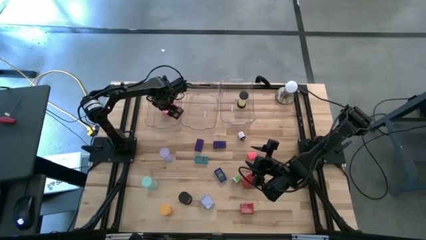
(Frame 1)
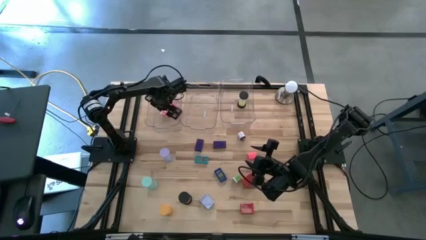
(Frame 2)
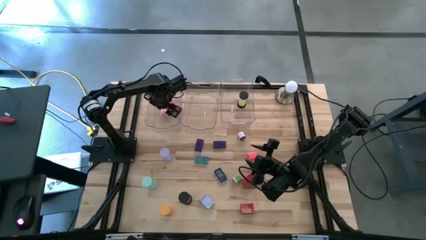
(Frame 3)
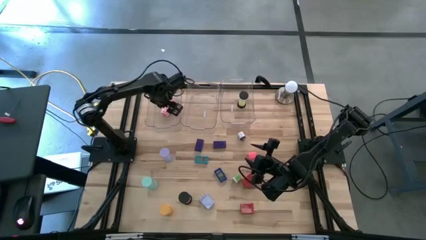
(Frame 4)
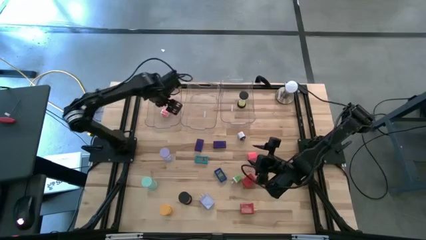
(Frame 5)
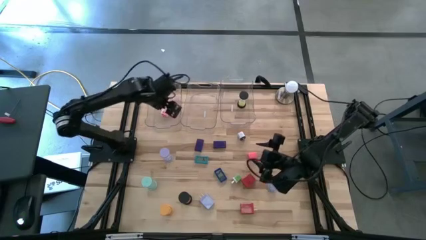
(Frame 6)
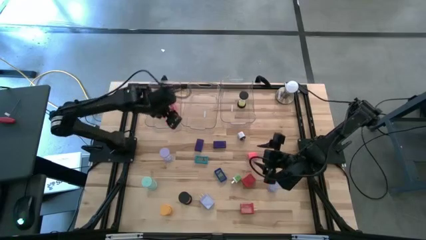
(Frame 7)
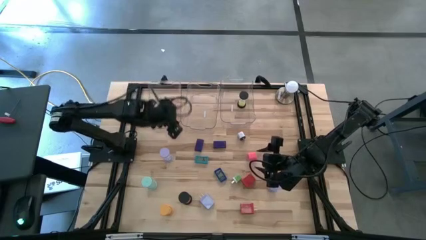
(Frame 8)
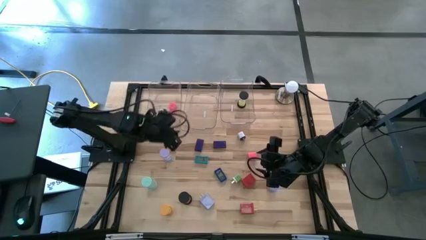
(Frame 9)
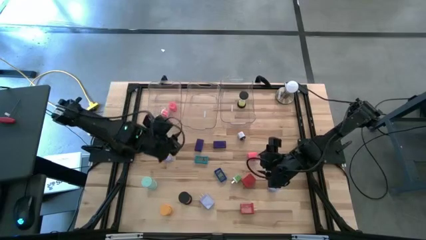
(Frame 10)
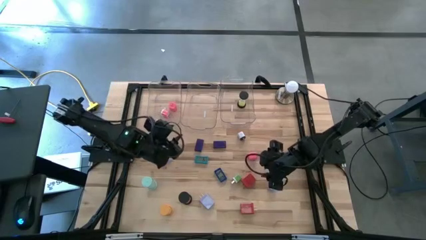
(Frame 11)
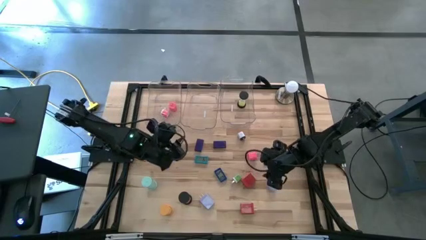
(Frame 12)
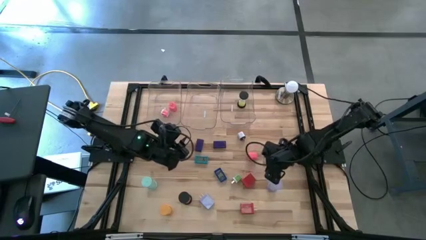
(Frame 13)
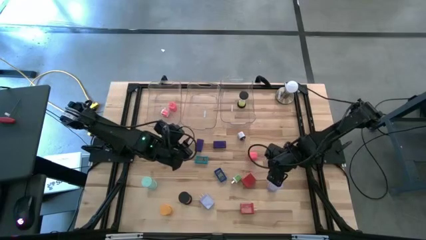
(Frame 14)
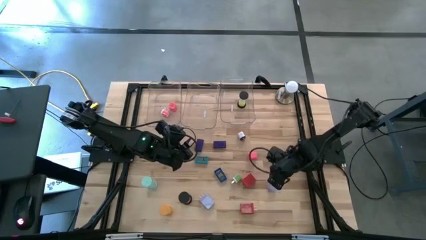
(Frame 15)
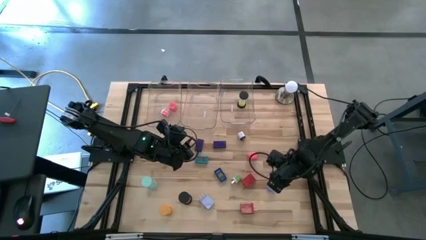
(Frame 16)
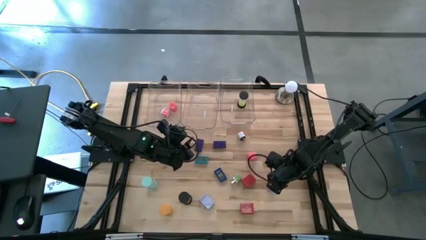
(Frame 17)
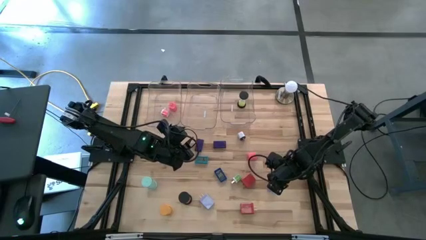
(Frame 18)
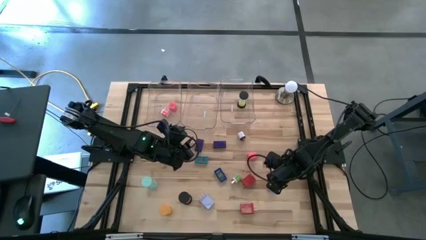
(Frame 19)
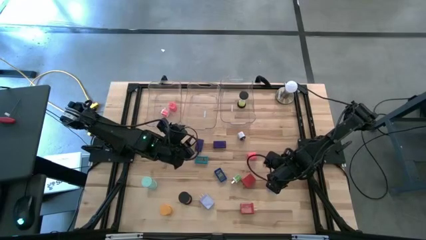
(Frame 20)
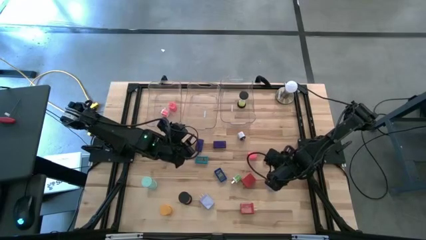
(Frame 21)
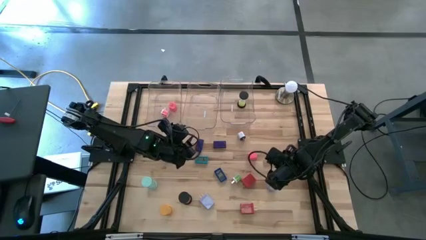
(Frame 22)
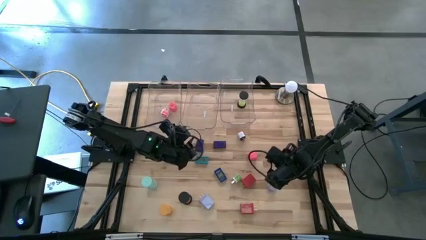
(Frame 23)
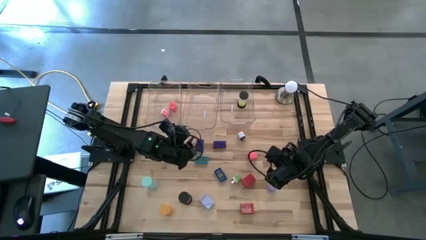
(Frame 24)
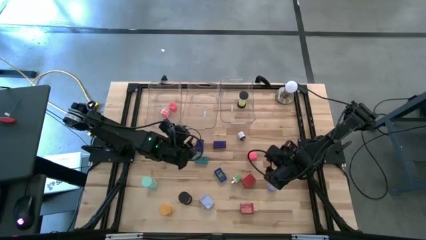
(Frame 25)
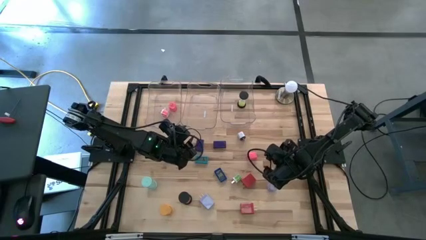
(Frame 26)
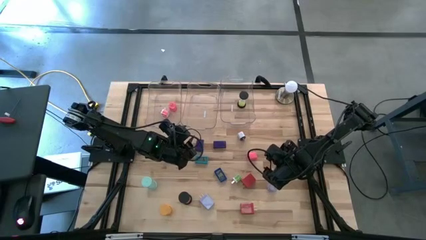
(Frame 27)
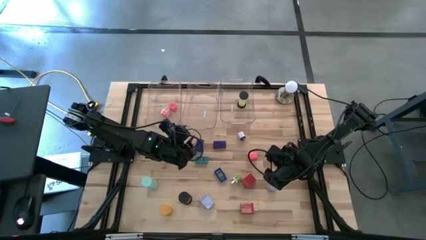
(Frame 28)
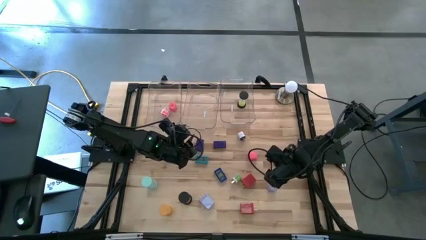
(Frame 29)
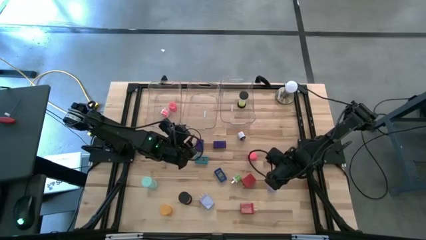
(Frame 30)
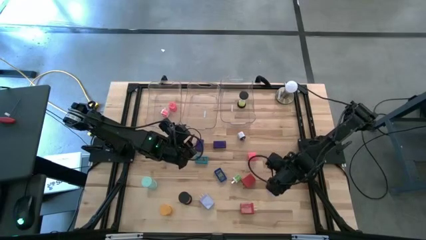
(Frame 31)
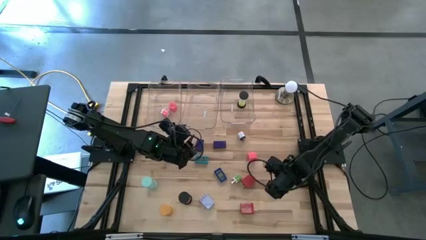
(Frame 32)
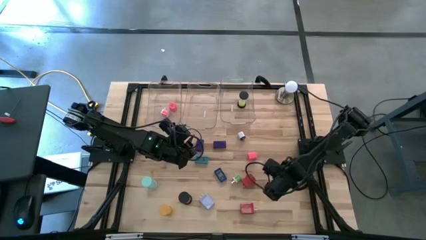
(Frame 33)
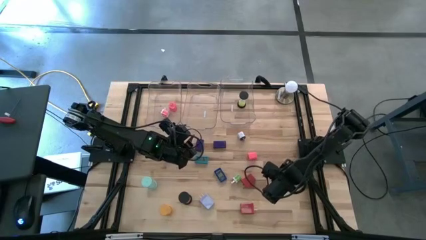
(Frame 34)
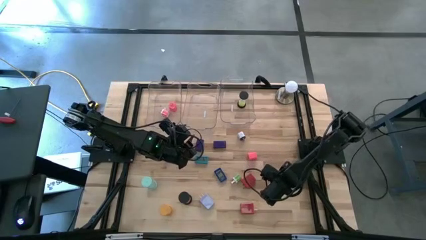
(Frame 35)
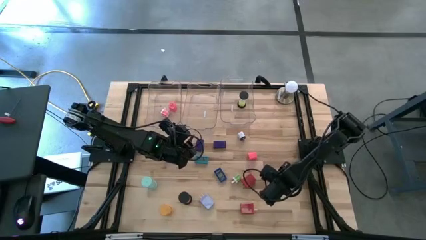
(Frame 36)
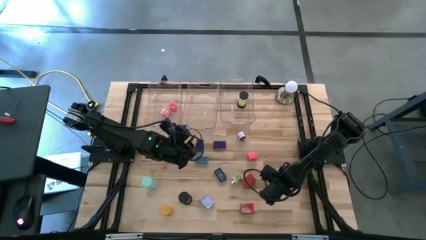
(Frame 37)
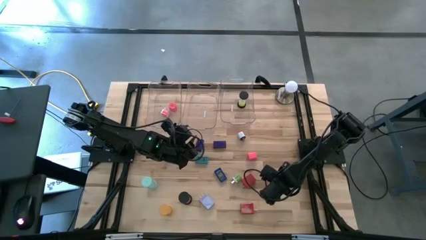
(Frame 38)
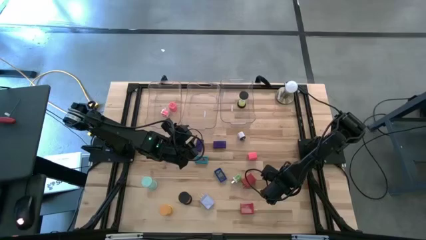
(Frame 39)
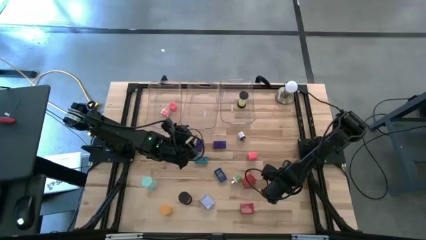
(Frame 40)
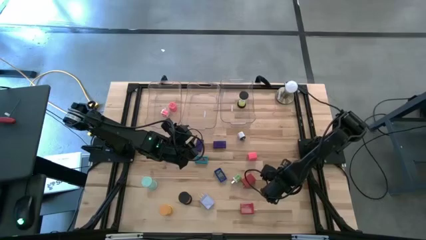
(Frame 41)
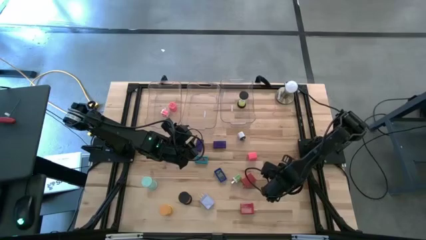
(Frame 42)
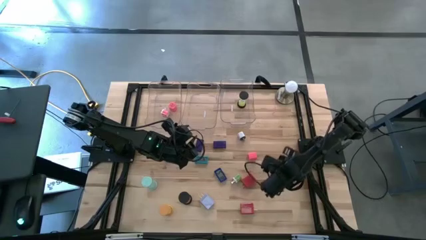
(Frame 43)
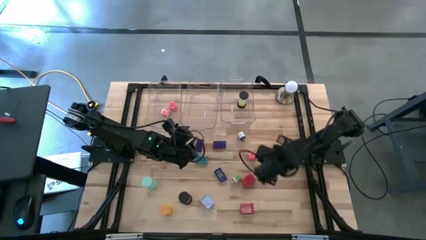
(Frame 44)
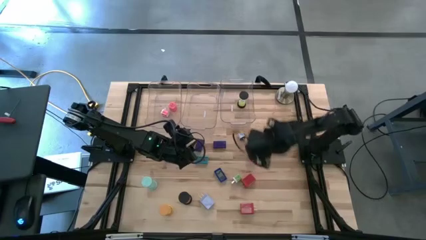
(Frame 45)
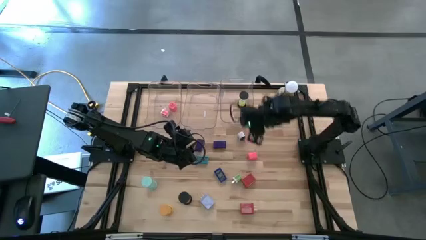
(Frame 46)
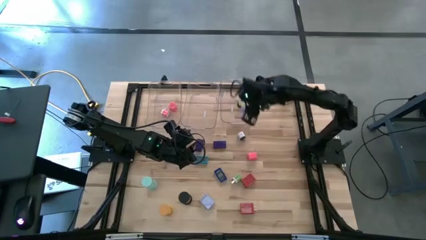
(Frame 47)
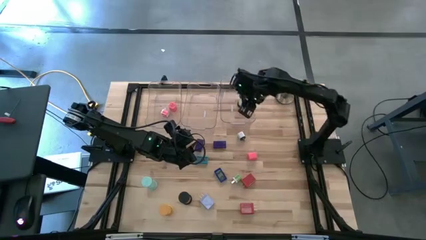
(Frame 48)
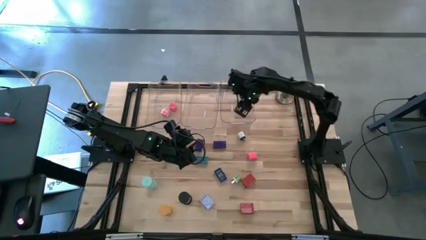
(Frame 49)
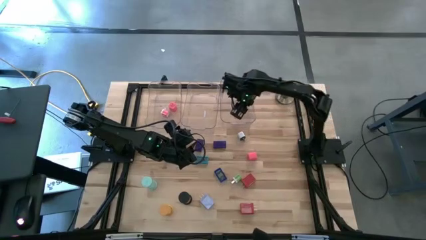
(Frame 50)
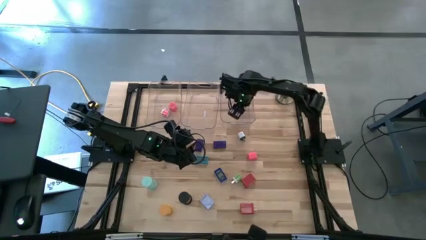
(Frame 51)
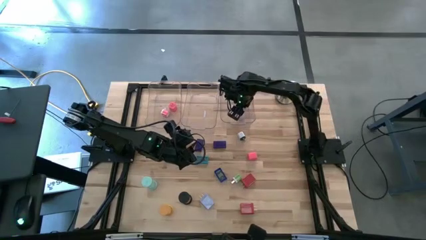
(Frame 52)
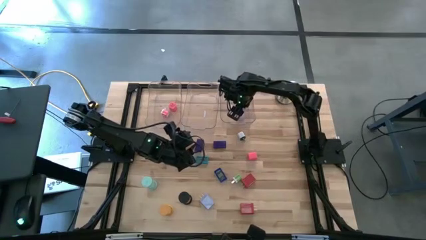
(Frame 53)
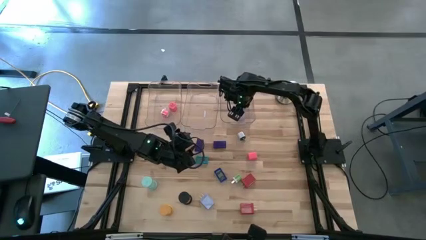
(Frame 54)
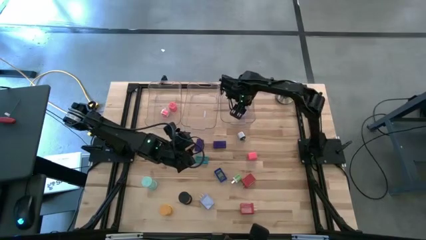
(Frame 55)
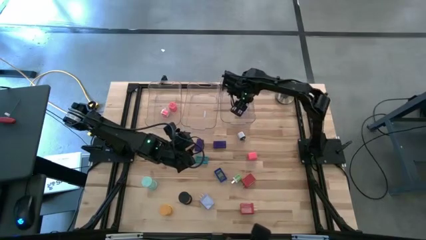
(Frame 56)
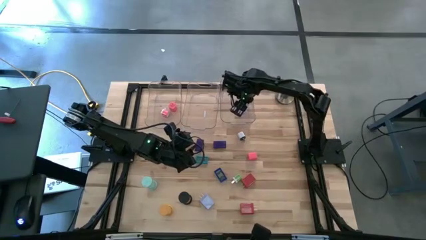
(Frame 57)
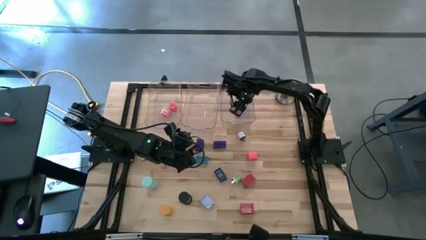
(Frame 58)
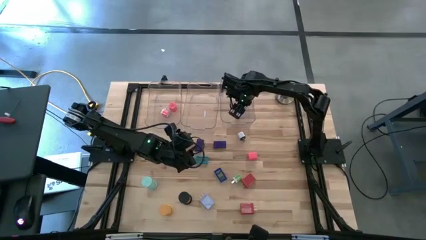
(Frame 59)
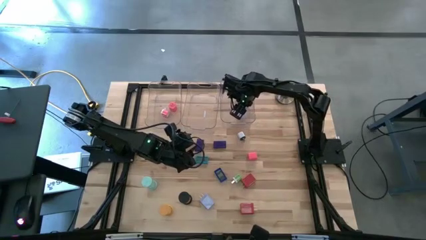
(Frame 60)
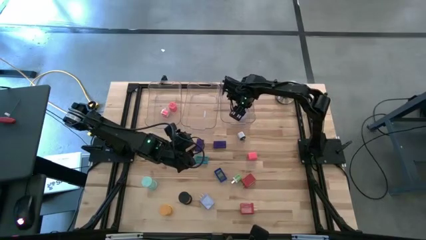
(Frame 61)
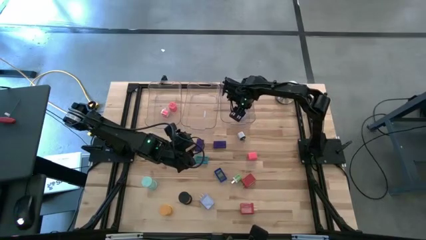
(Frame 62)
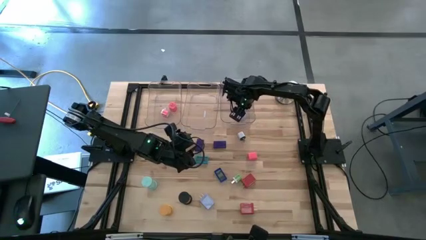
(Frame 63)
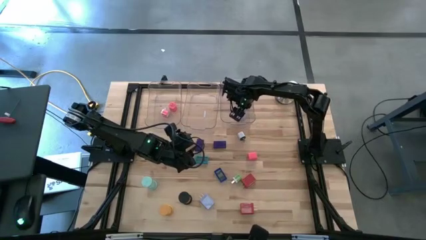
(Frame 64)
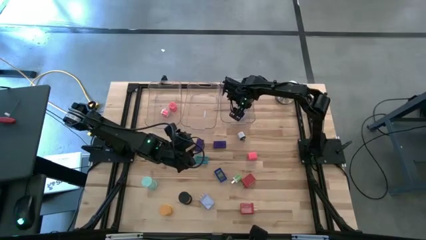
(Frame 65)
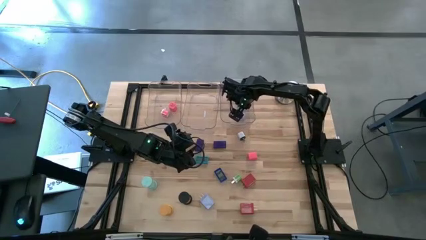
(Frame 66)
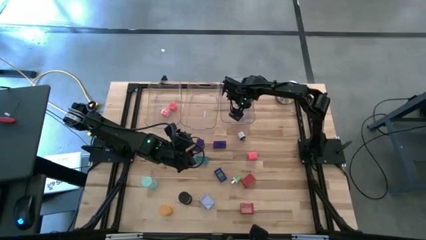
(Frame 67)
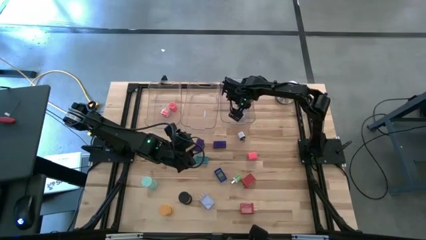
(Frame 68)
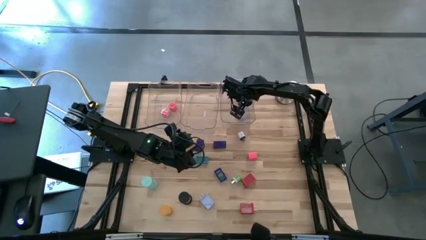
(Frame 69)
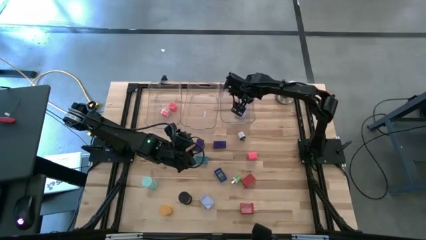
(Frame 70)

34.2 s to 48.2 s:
Task: Pick & Place Office items
Put the right purple hourglass into the right transparent bin

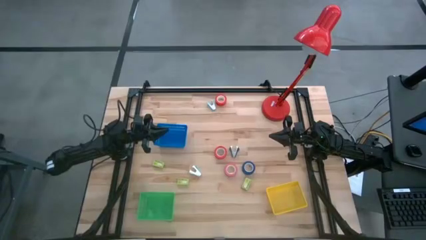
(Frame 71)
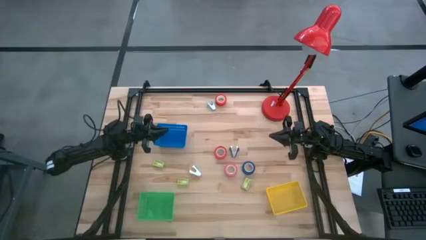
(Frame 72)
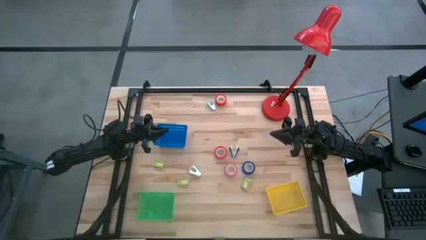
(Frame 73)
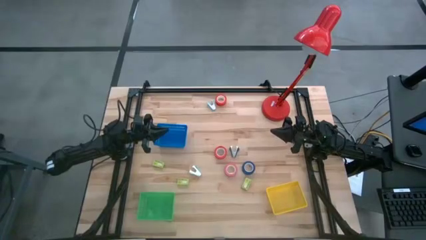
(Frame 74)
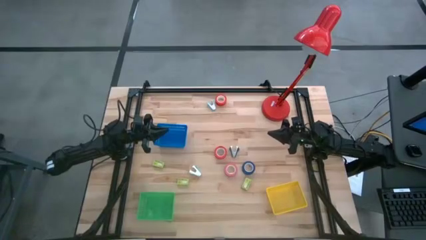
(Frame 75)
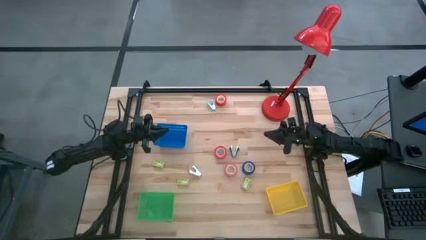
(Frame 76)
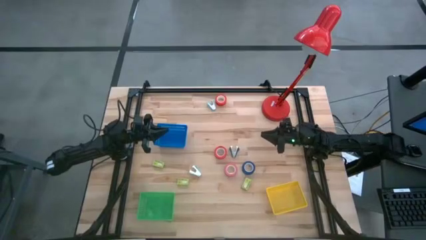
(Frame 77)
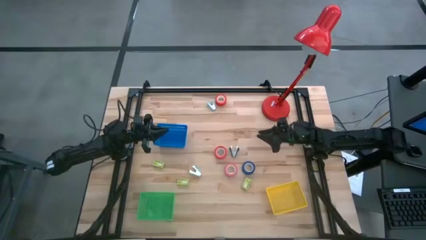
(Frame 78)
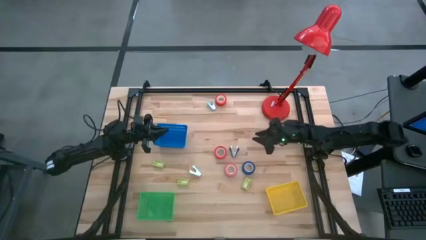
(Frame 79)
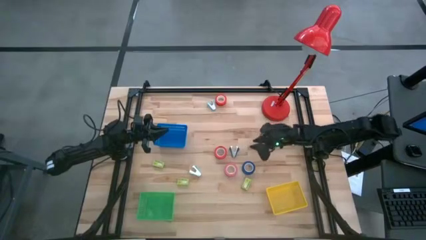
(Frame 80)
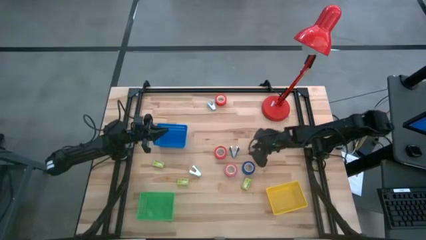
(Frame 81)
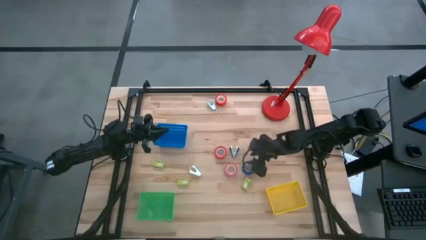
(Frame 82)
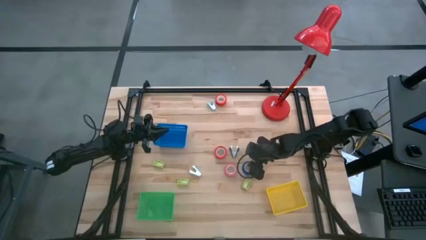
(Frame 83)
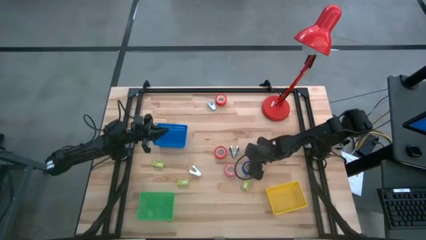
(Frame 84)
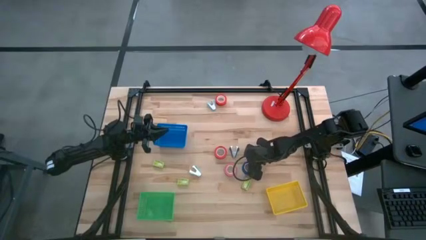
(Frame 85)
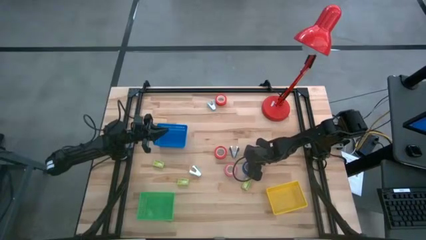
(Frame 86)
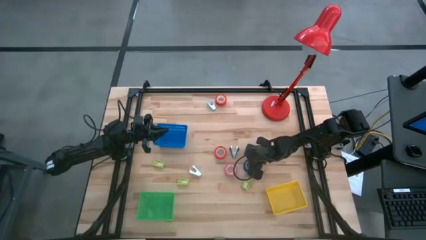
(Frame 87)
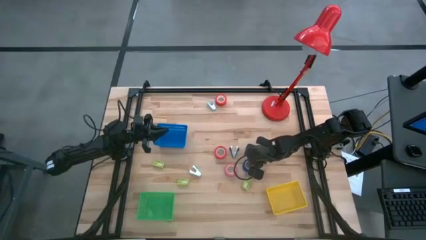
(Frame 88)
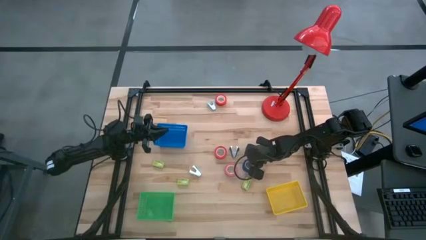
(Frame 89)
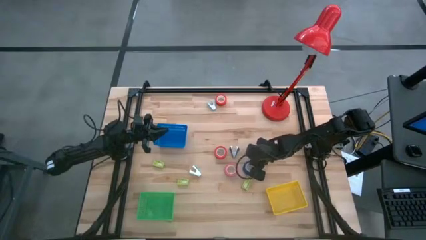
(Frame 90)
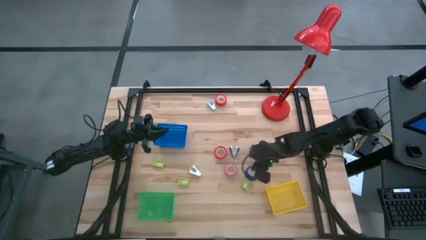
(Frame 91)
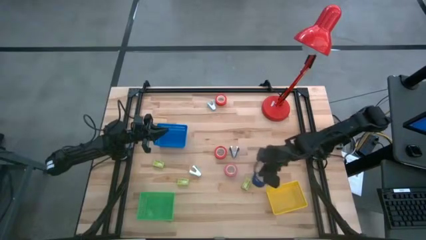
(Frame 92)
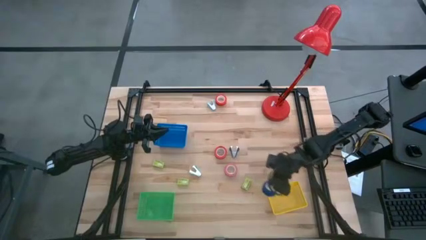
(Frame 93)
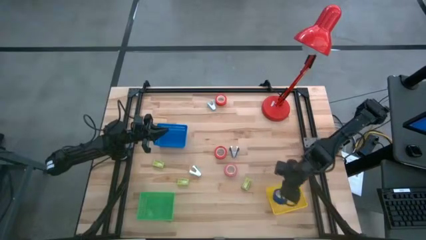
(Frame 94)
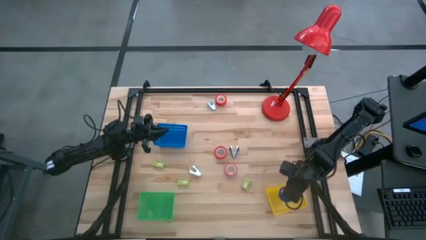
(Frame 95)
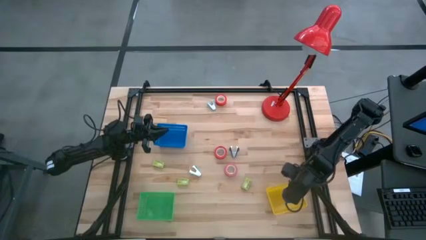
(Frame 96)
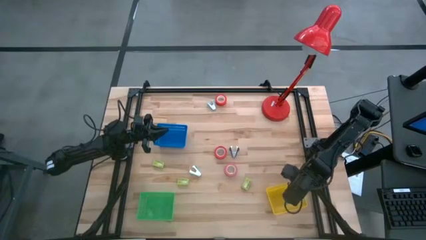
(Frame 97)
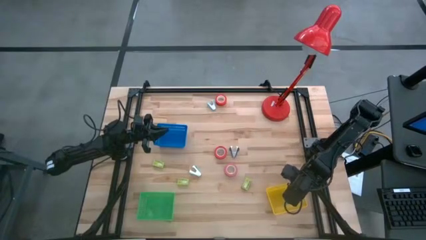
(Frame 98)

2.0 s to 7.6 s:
Task: Pick and place Stapler, Stapler remover, tape
Put the blue tape into the yellow bin
